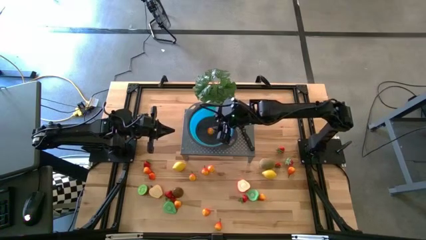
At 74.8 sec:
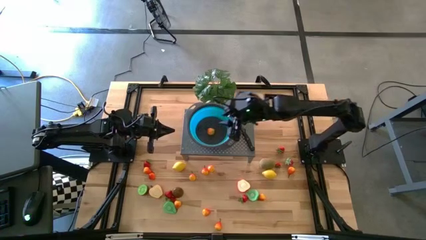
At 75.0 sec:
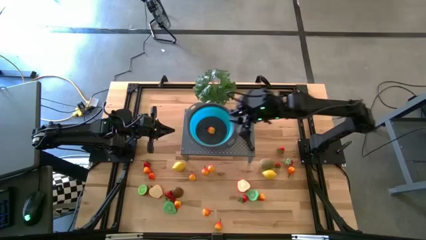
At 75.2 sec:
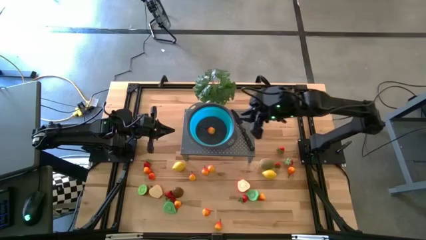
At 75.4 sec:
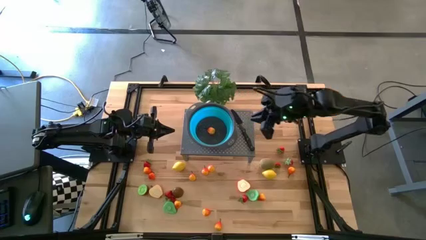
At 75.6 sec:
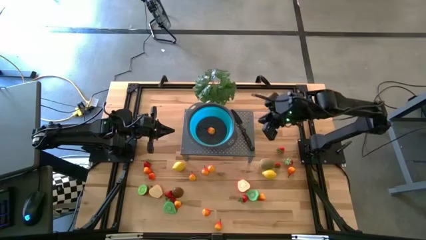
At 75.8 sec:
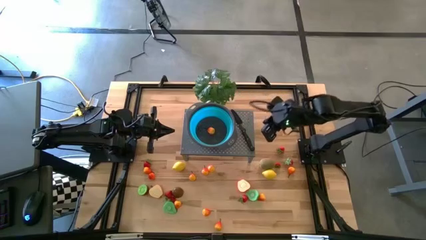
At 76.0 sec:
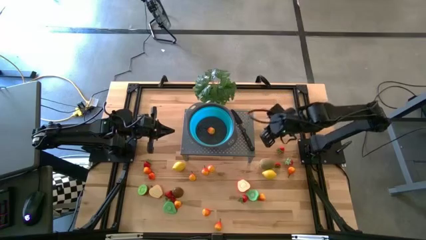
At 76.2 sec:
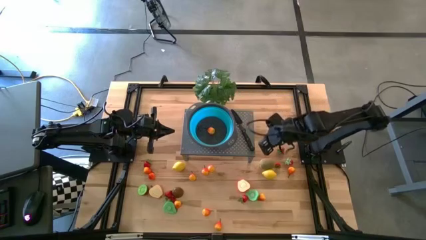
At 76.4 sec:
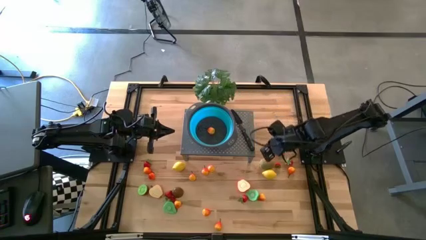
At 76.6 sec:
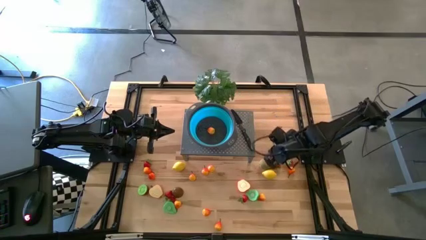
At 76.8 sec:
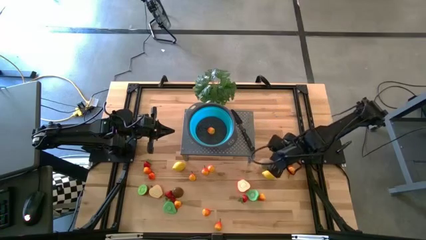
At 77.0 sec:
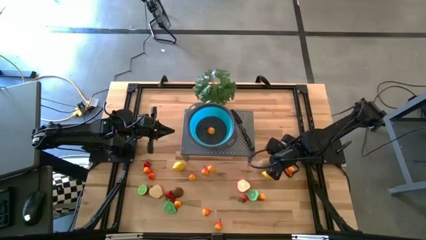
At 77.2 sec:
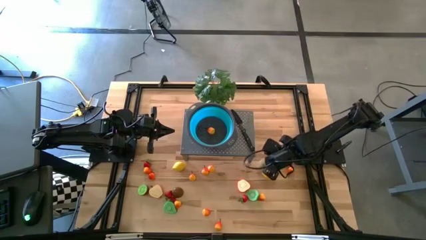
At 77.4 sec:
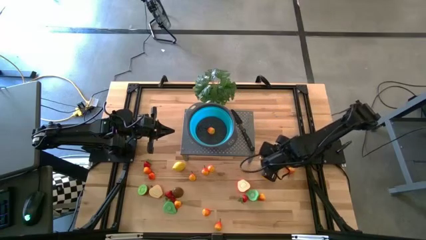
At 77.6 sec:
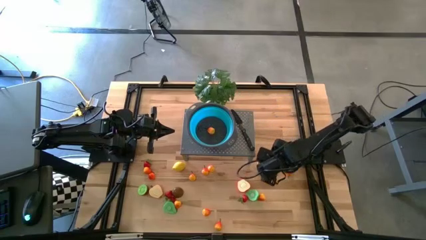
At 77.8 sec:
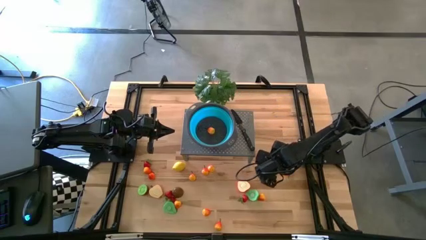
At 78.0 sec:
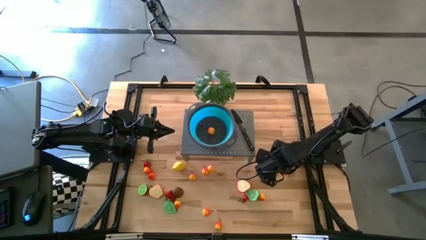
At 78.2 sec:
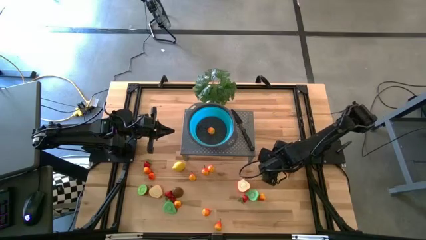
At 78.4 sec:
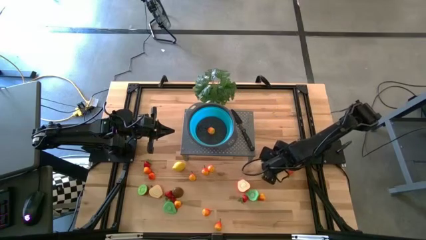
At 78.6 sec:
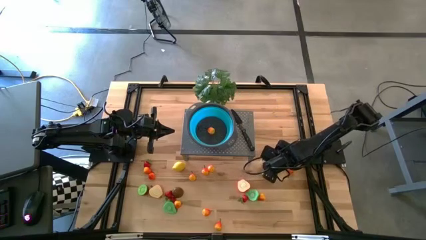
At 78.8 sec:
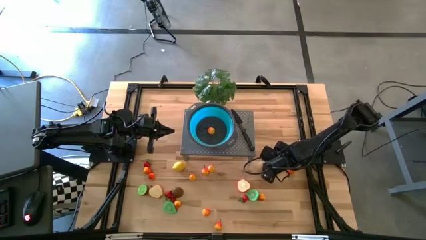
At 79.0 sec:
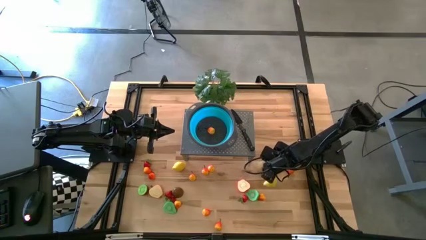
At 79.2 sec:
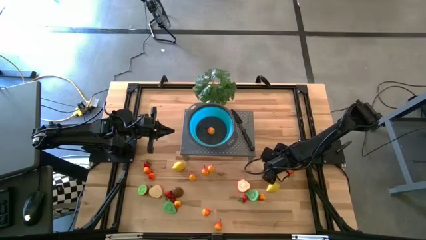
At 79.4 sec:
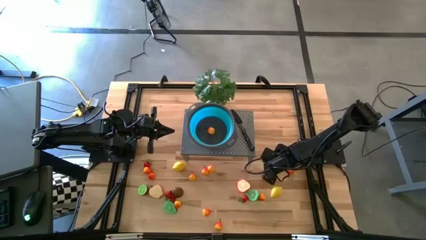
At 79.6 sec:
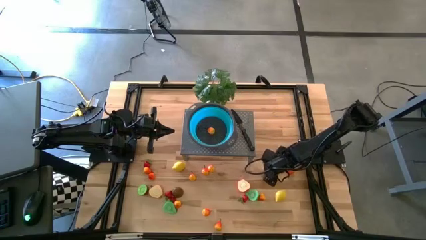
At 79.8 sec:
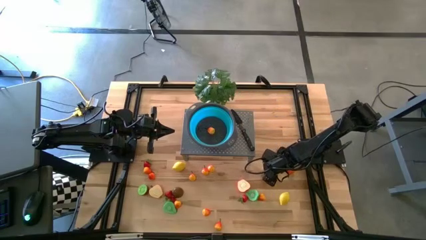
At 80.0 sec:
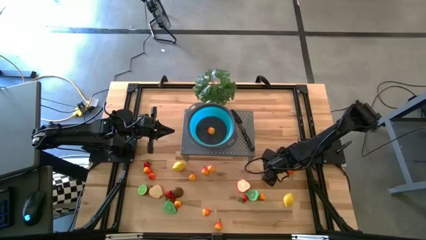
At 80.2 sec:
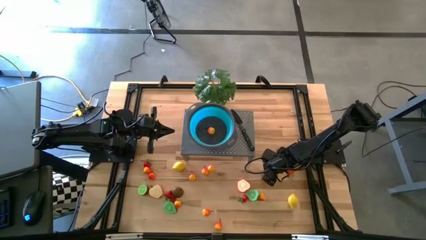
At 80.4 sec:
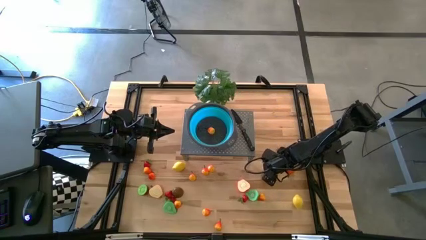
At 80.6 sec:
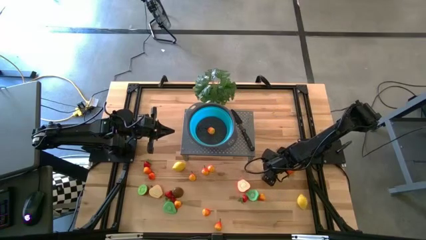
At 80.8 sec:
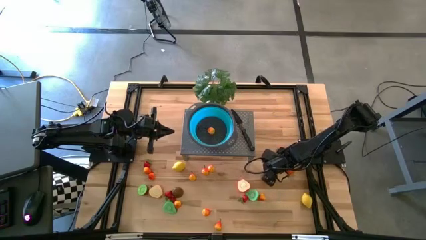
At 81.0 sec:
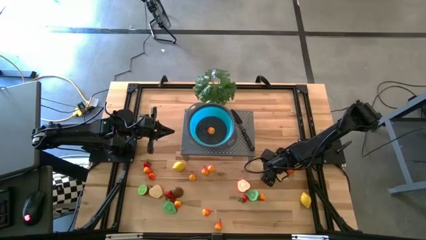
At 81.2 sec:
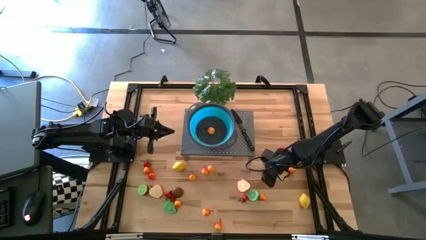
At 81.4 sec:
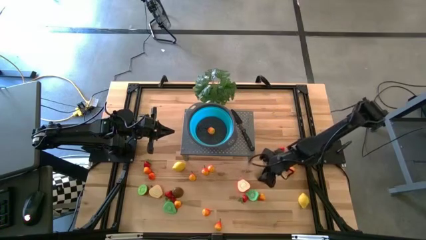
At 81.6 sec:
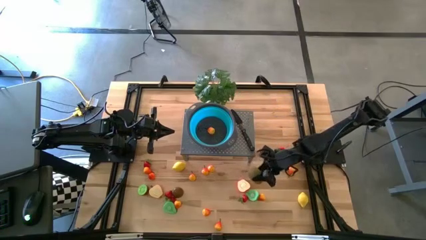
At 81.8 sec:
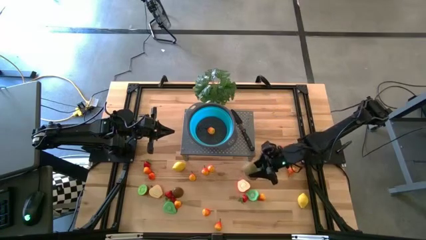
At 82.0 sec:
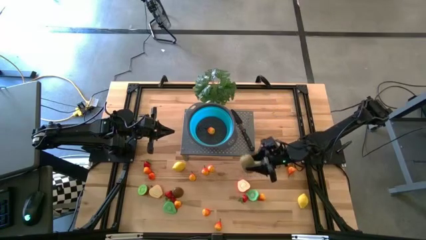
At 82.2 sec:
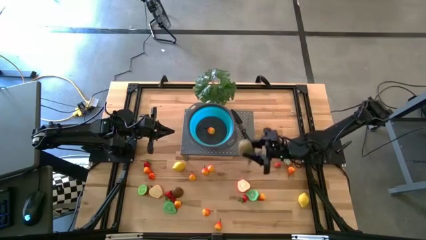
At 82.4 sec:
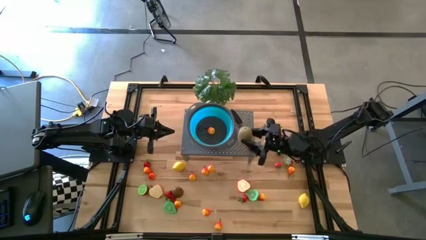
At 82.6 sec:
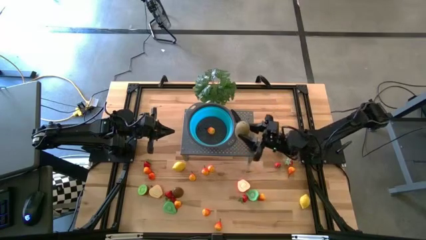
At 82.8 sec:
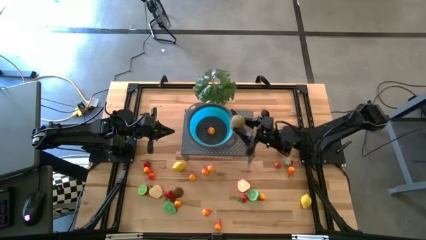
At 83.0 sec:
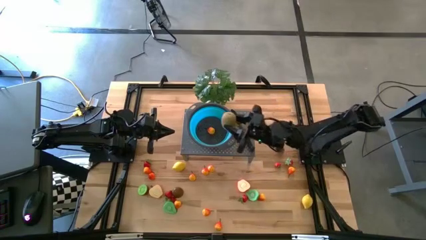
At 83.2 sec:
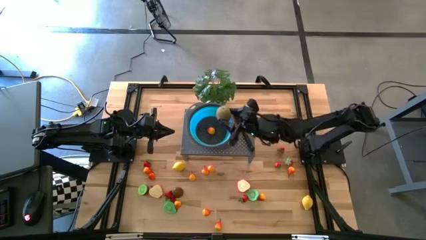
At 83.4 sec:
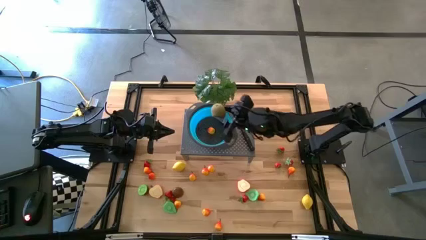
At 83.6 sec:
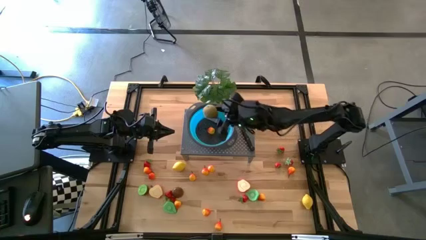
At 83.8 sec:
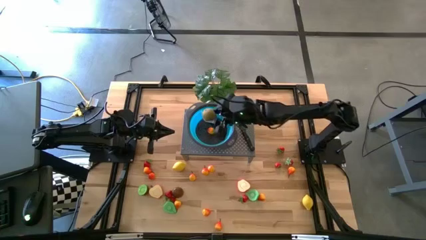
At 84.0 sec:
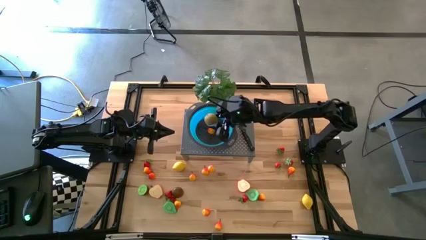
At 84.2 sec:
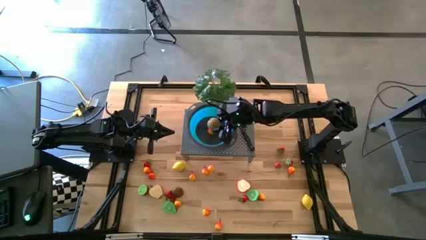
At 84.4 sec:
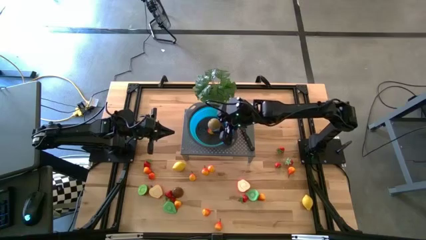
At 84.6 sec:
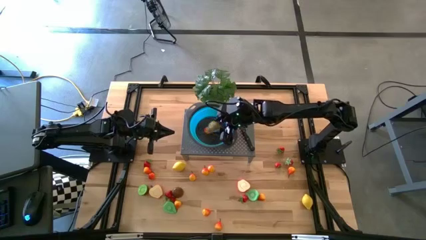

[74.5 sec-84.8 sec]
Task: Pick & Place Fruit
Put the kiwi into the blue strainer bowl on the shelf
